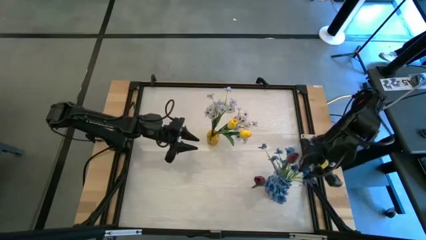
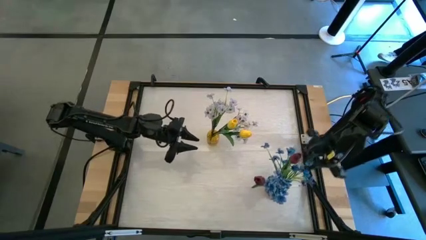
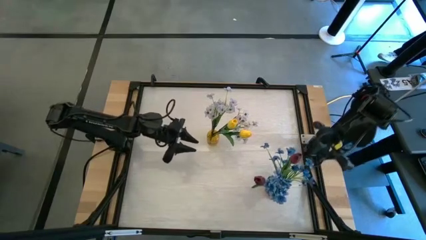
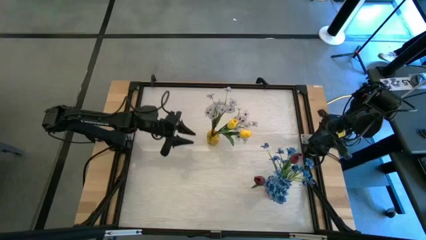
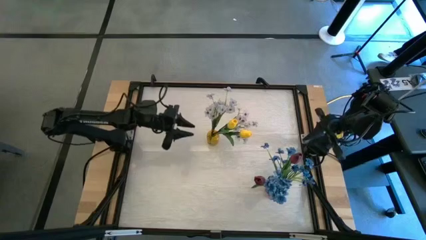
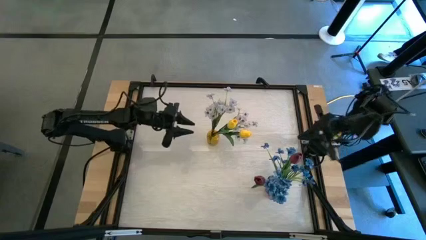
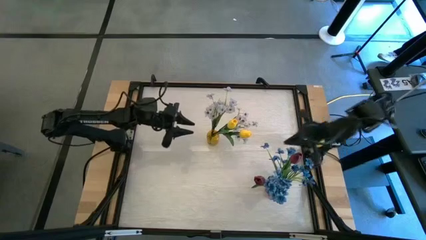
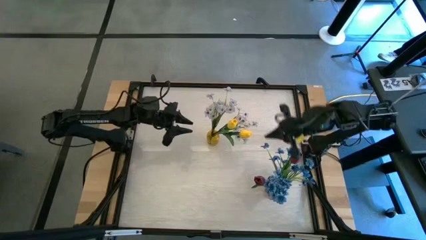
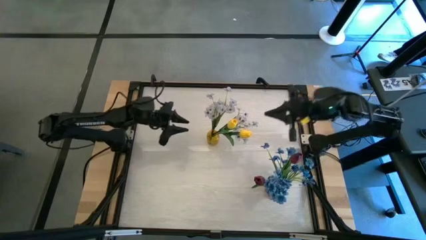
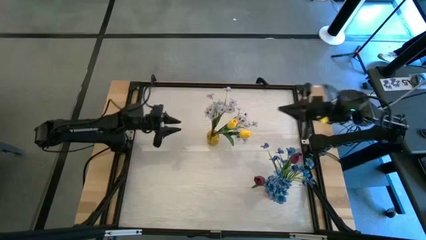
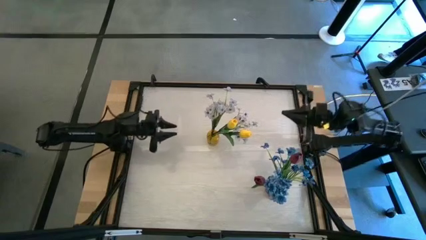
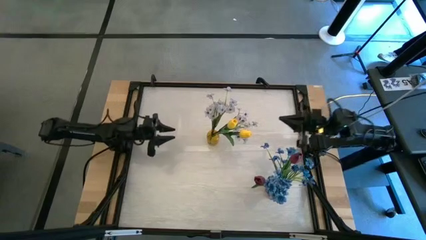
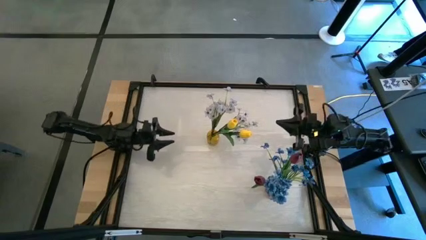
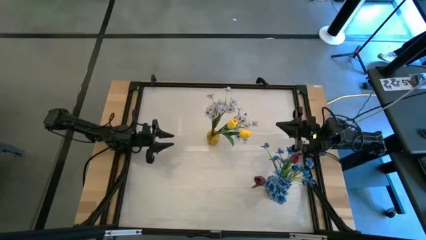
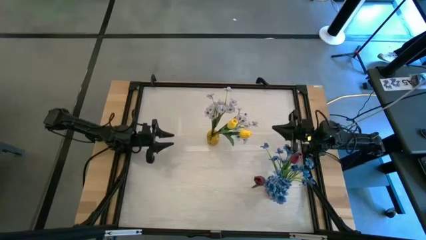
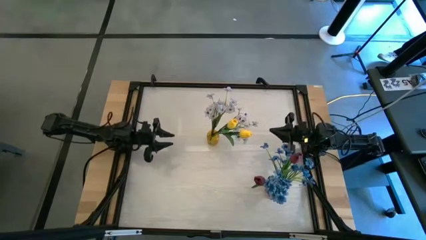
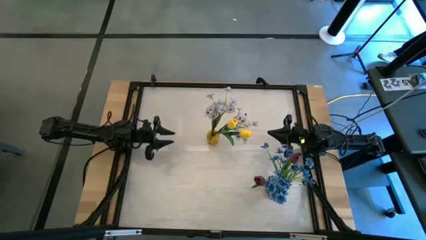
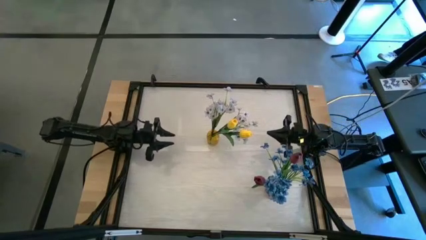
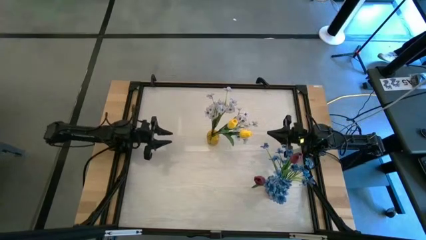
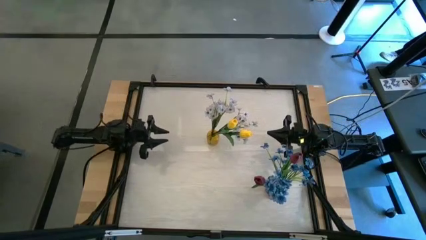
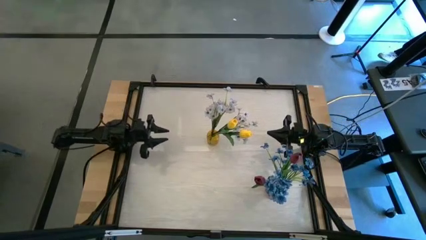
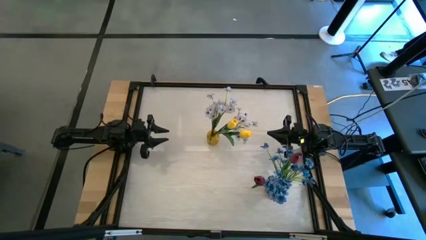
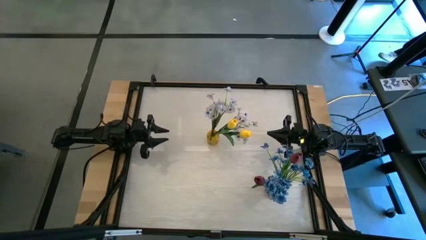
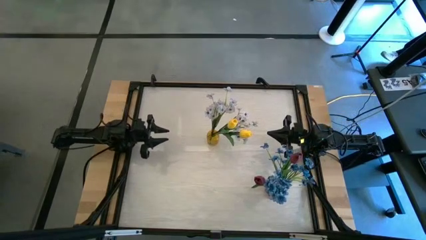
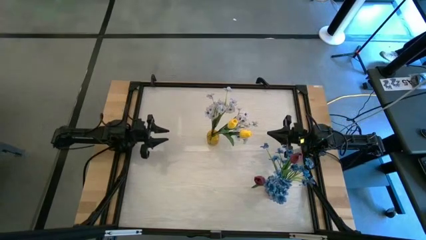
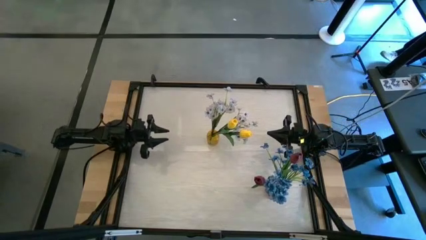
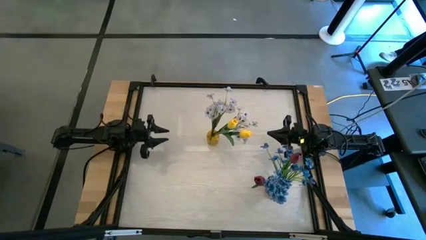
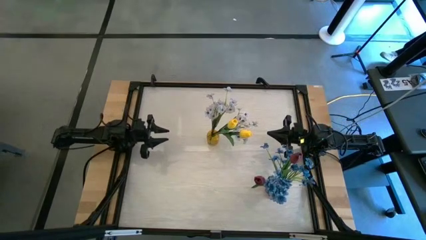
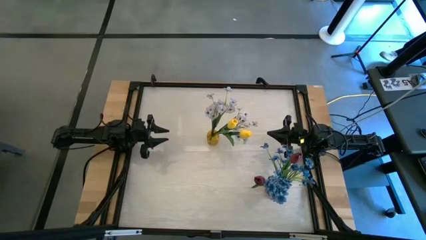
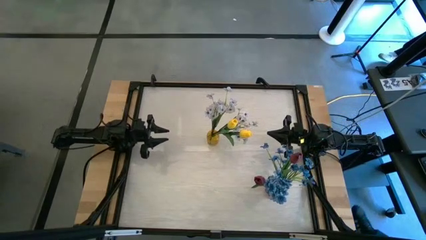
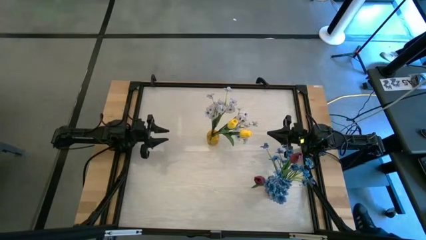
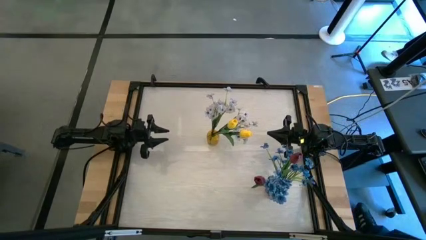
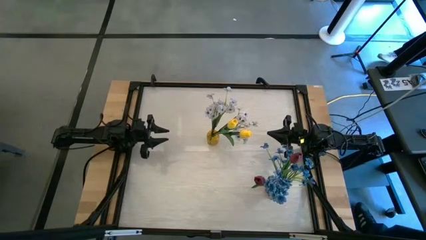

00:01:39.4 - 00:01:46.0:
Task: Sort flowers into vase by color
Return to Home Position

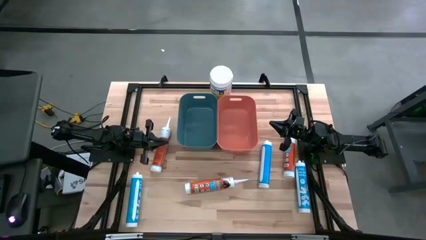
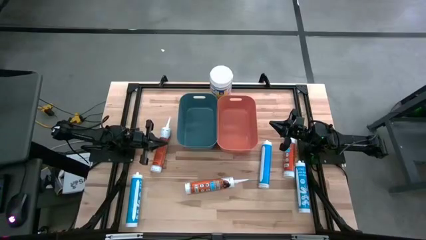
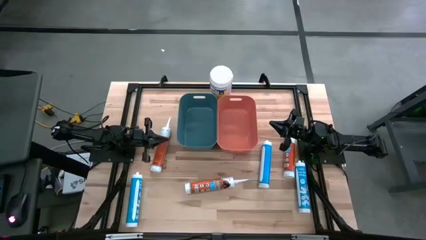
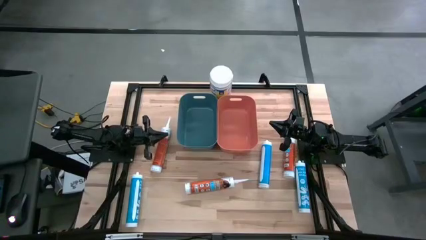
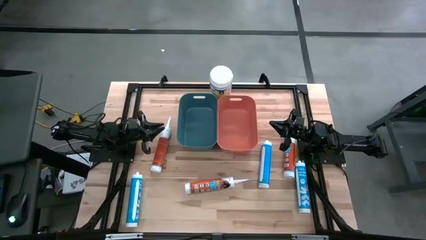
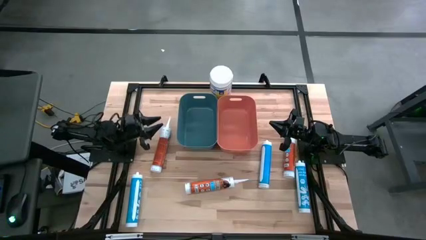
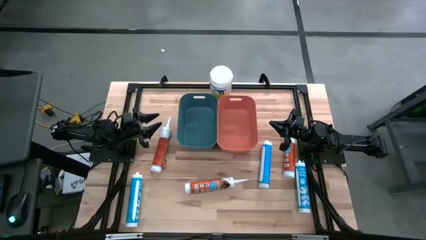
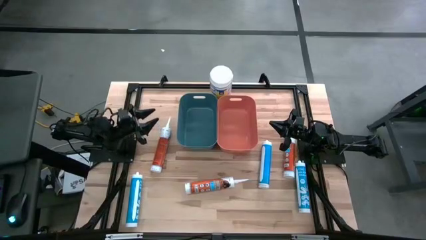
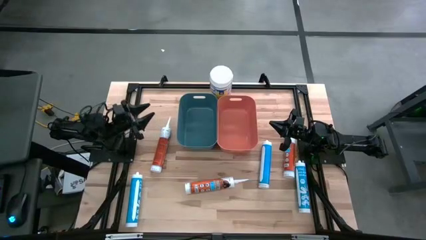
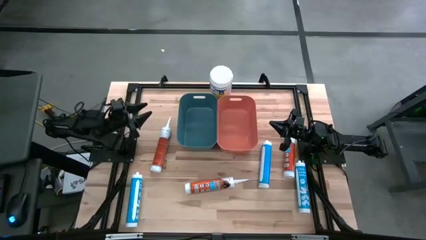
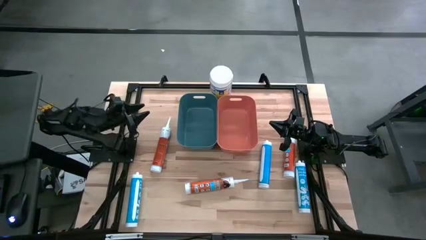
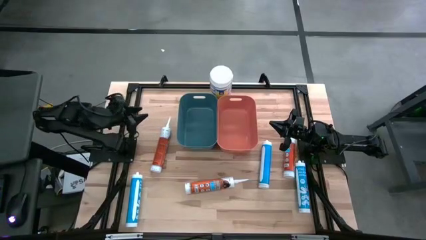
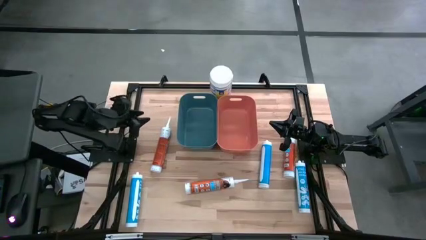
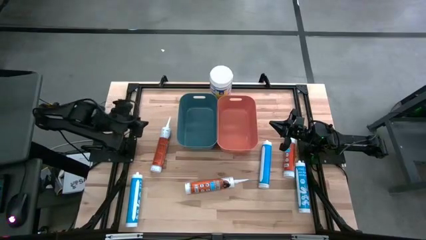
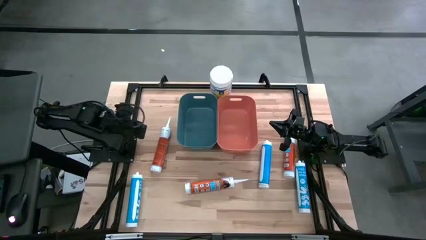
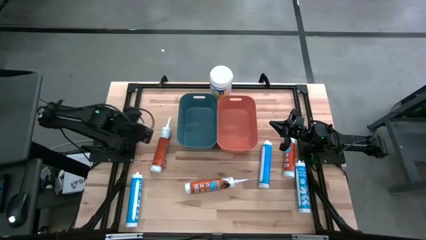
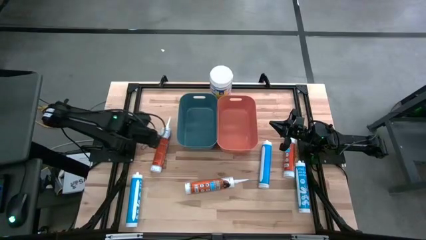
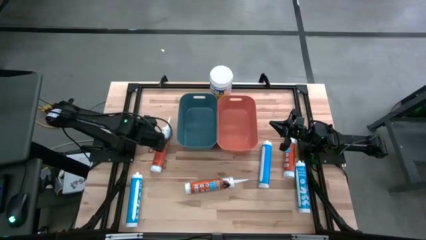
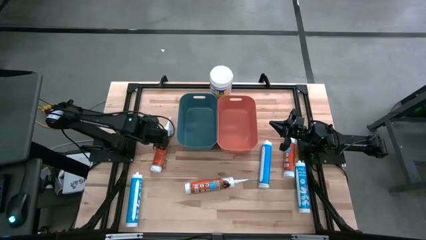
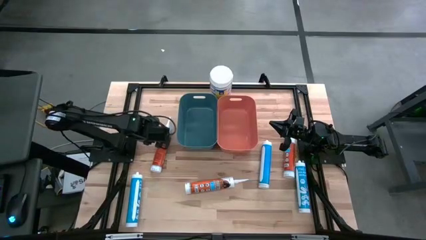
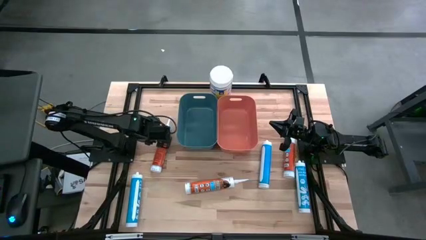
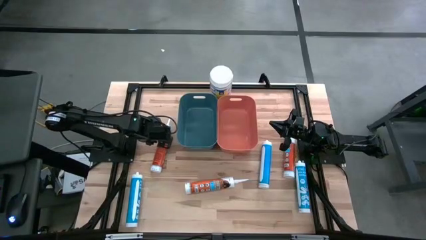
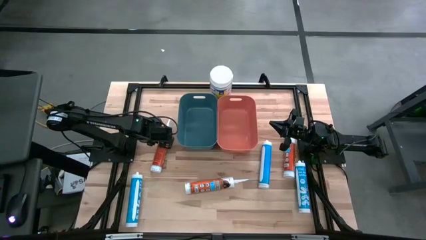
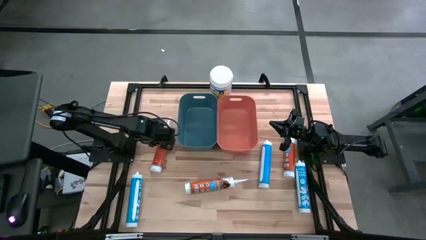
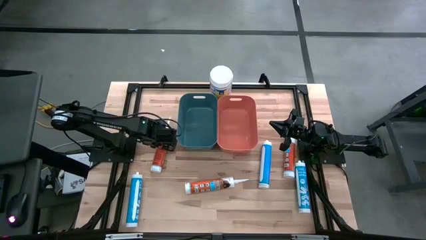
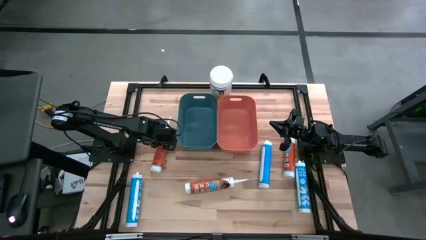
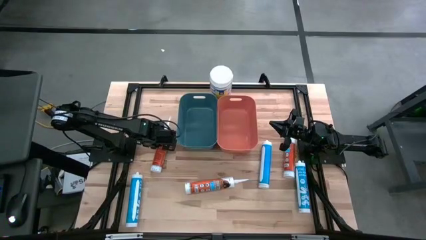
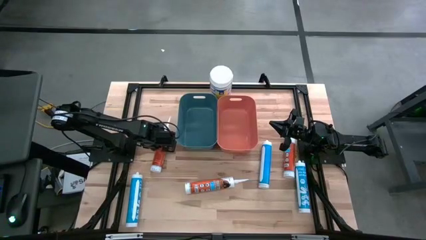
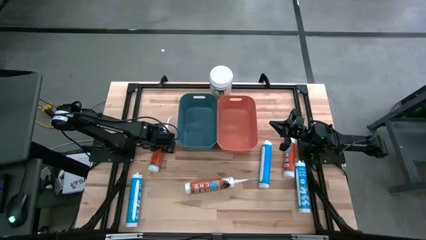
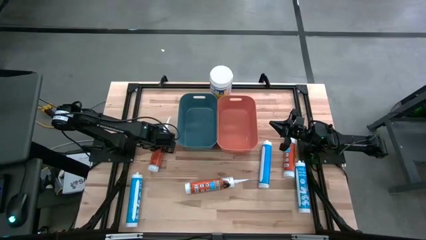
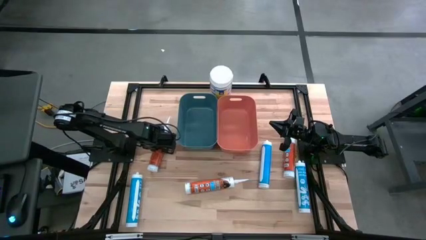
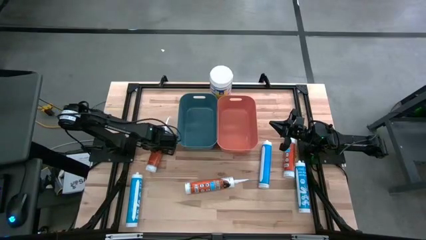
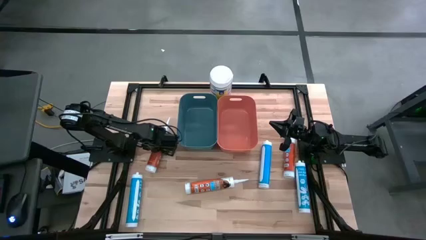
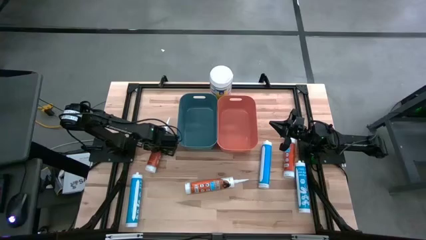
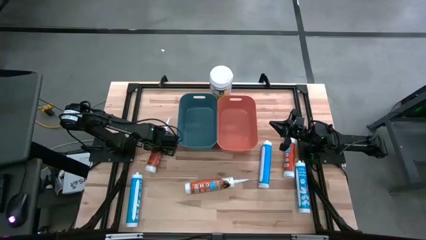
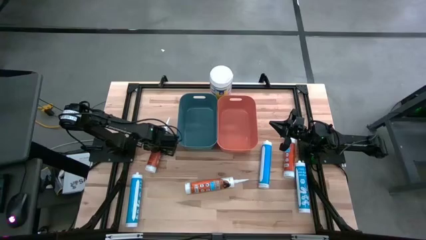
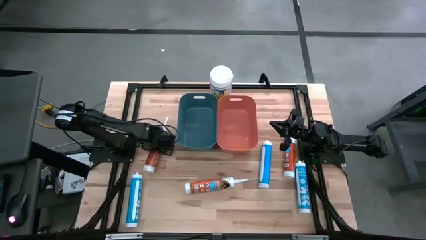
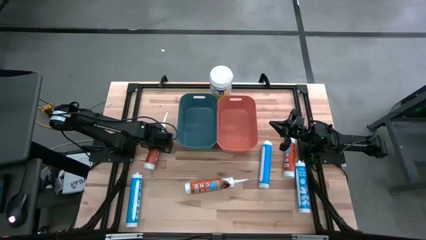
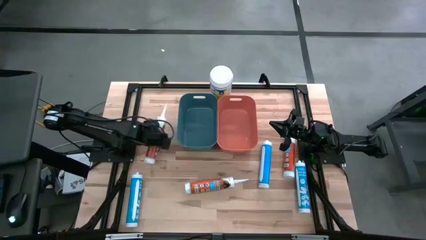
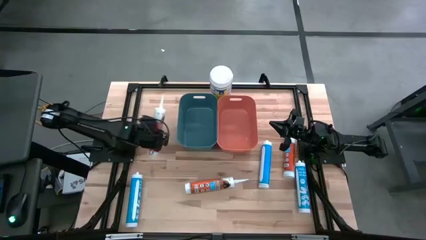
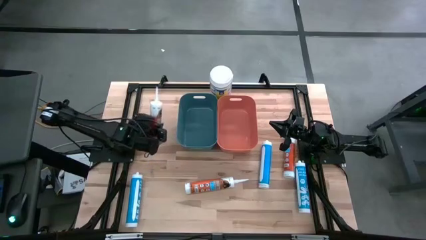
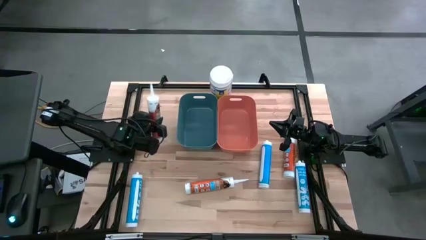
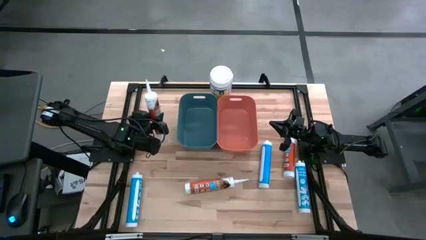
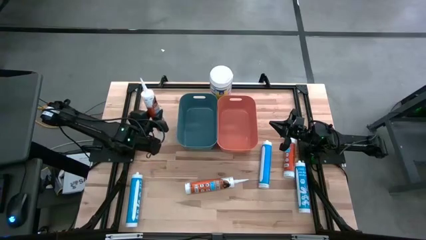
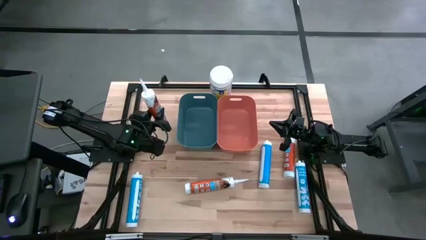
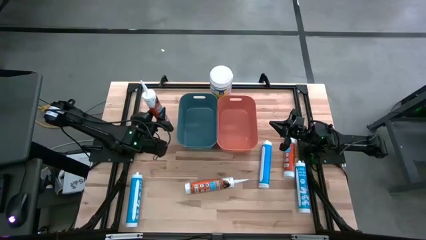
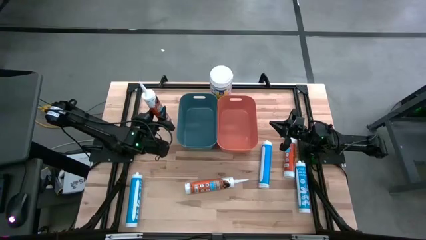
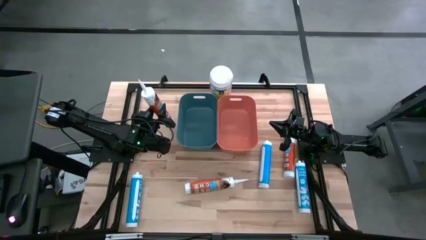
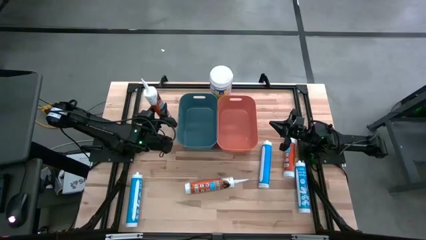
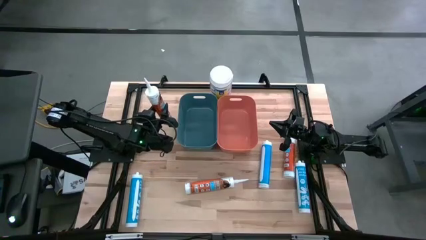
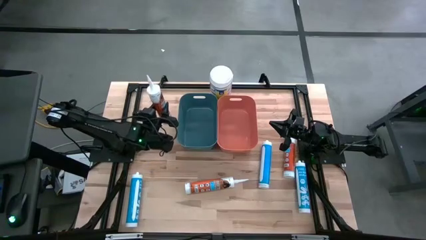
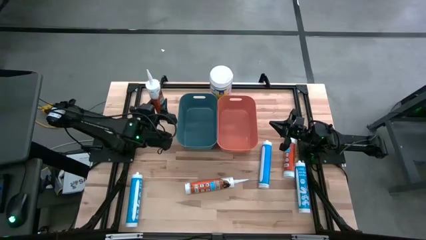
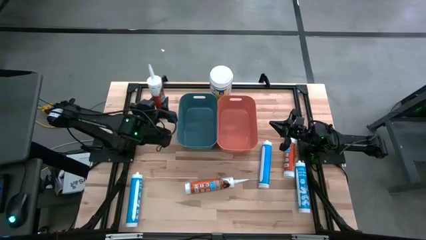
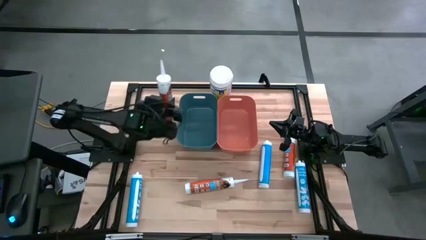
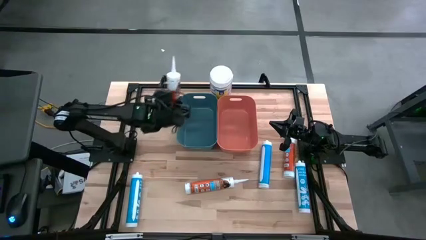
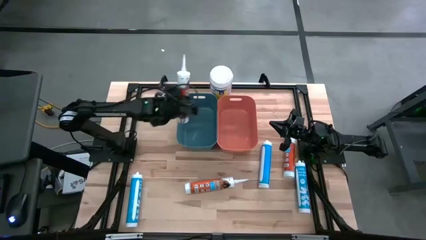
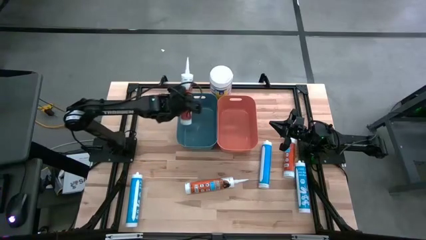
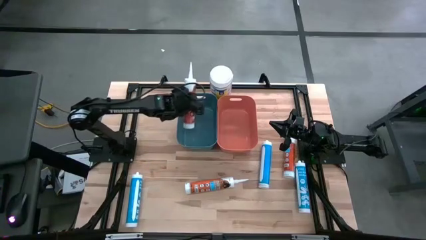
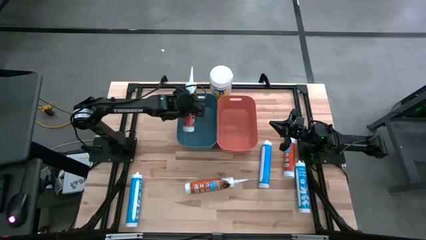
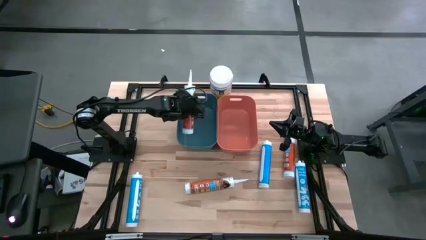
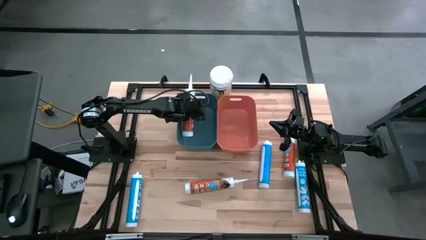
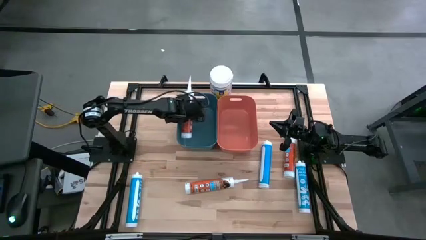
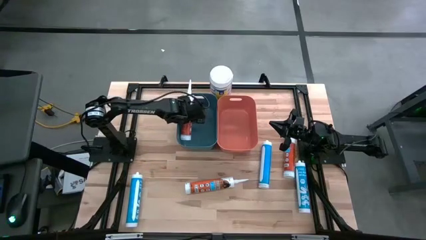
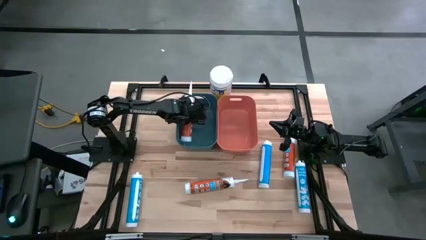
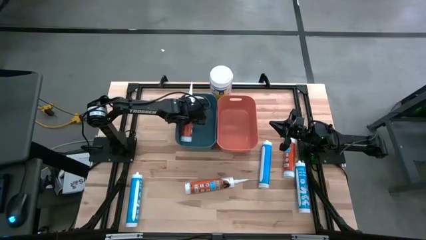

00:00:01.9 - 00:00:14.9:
Task: Pick & place silicon tubes, Sealant and Lysol wipes
Put the top left orange sealant into the blue bin
